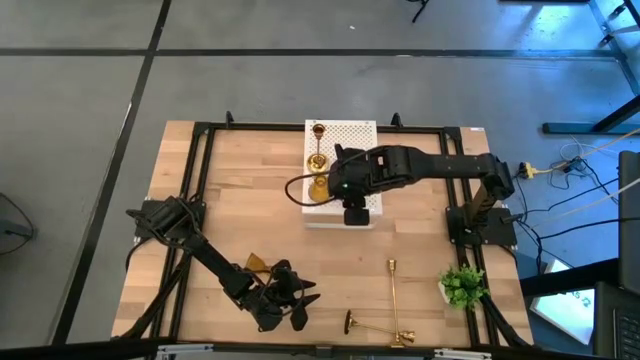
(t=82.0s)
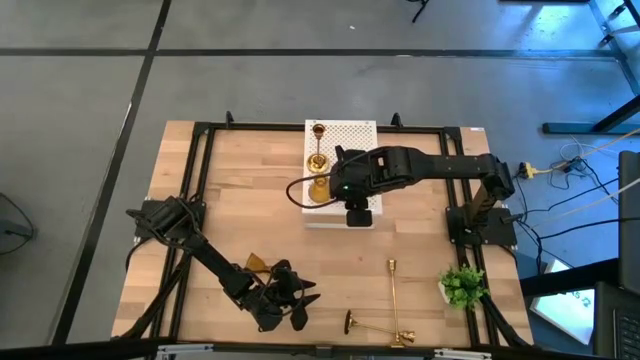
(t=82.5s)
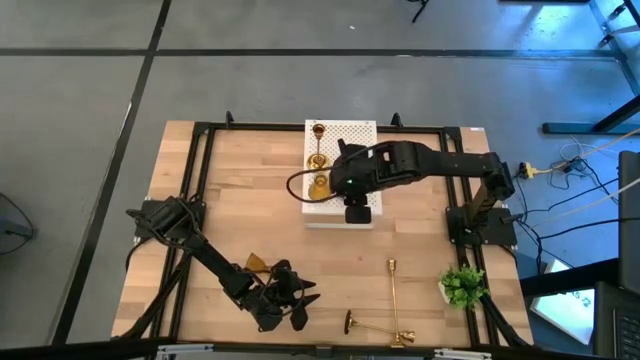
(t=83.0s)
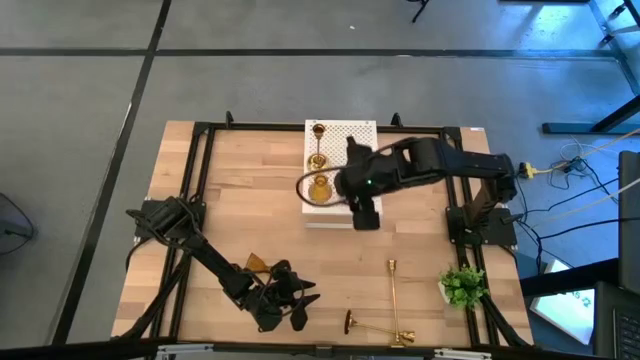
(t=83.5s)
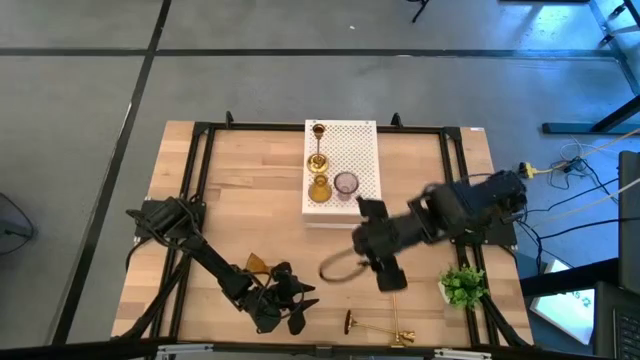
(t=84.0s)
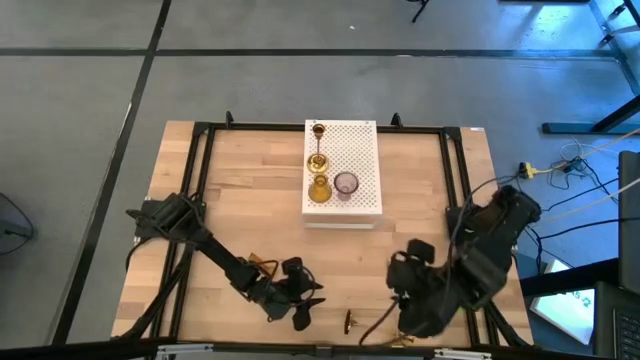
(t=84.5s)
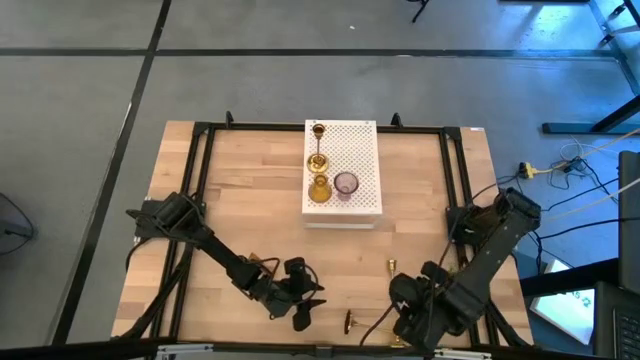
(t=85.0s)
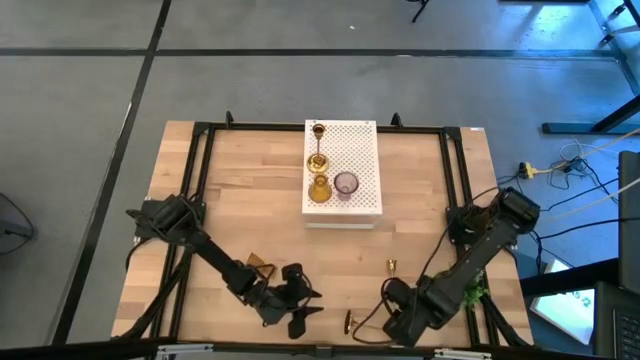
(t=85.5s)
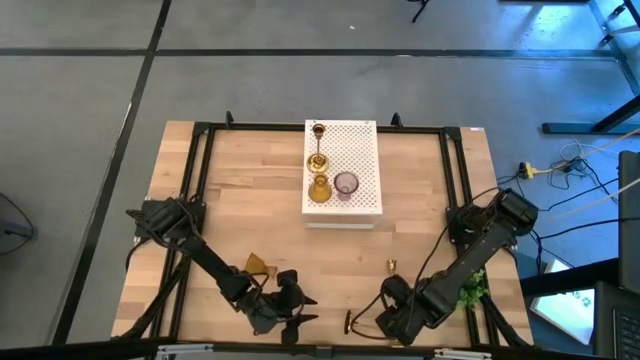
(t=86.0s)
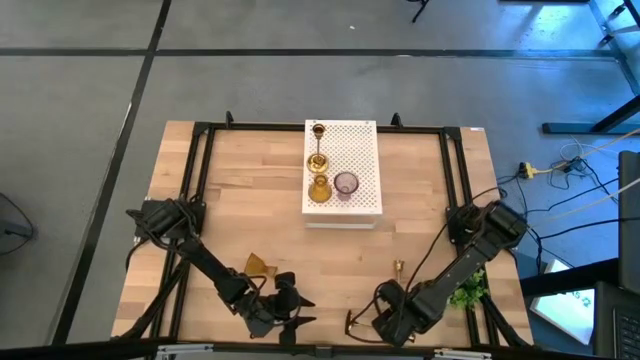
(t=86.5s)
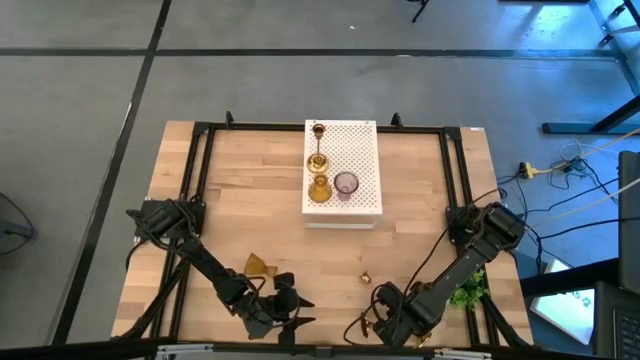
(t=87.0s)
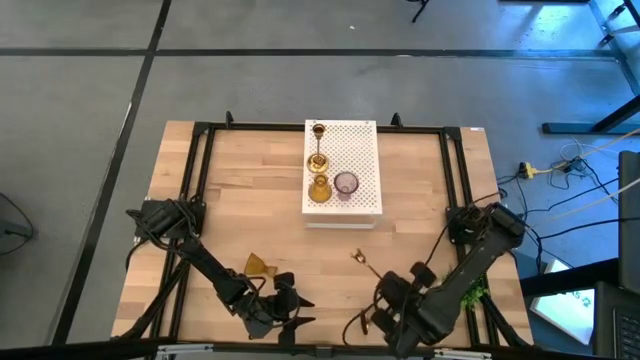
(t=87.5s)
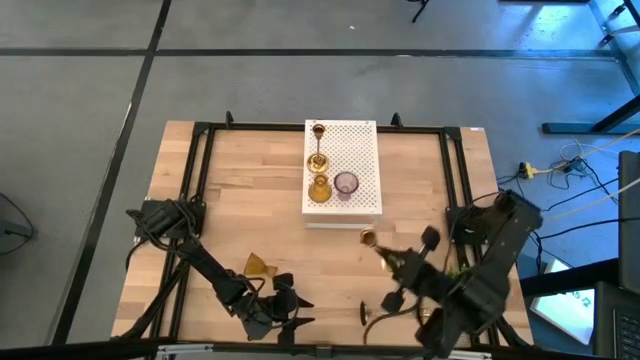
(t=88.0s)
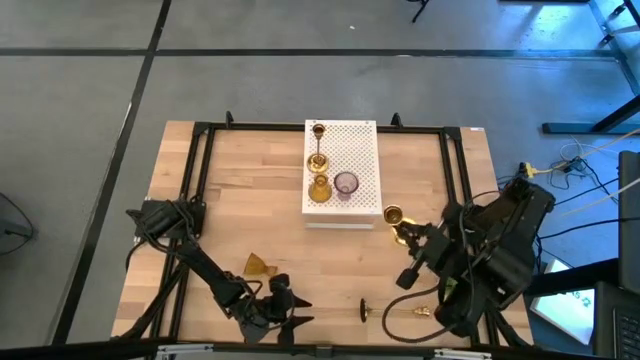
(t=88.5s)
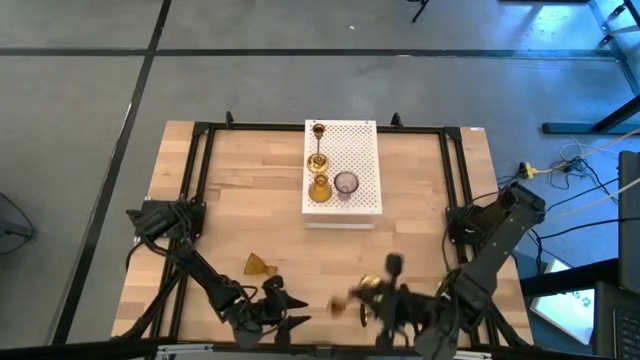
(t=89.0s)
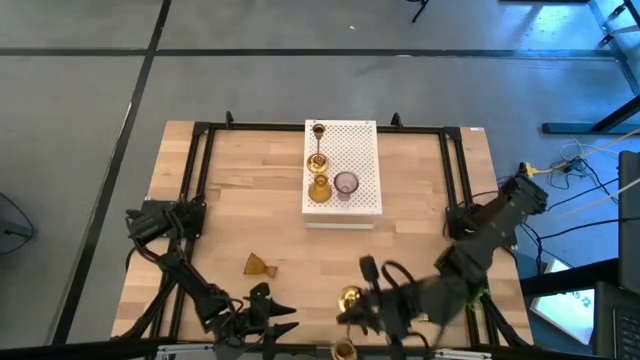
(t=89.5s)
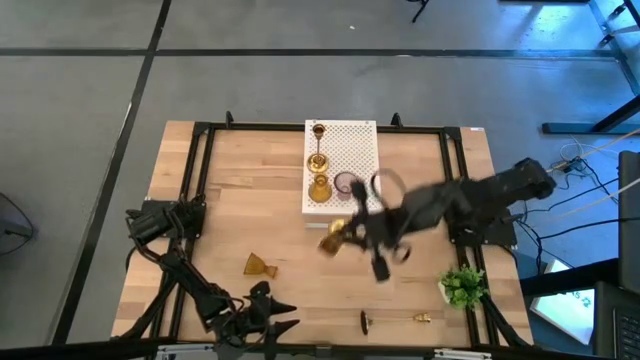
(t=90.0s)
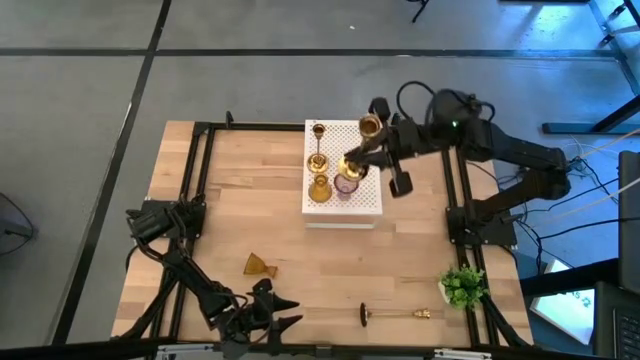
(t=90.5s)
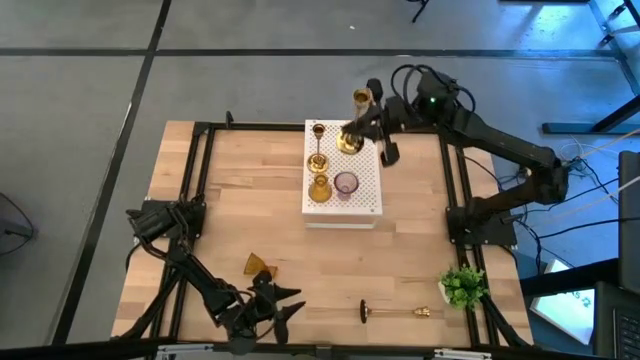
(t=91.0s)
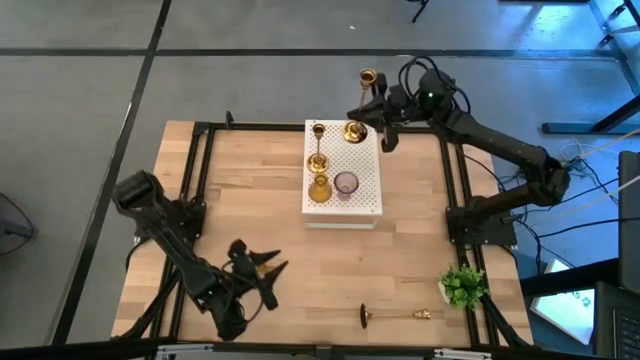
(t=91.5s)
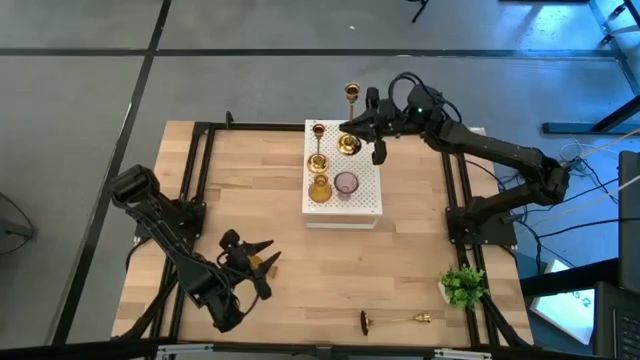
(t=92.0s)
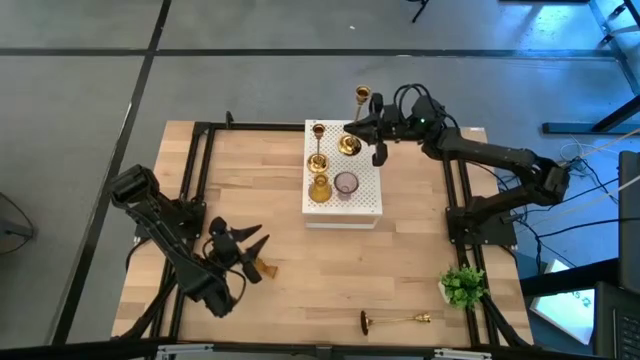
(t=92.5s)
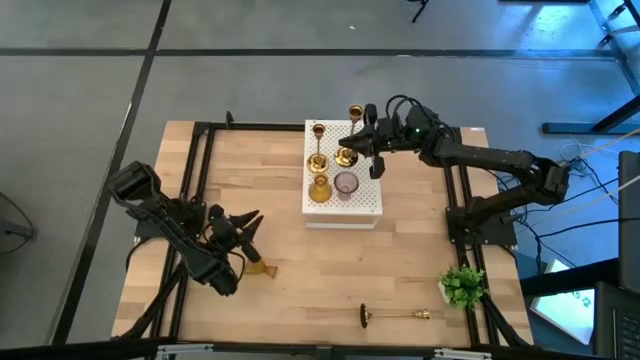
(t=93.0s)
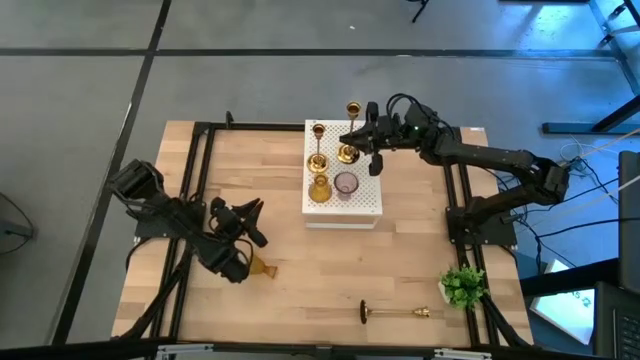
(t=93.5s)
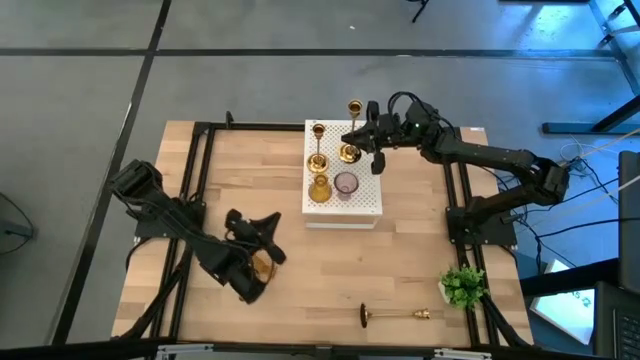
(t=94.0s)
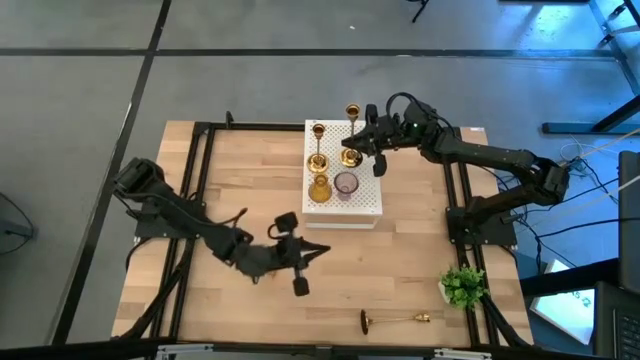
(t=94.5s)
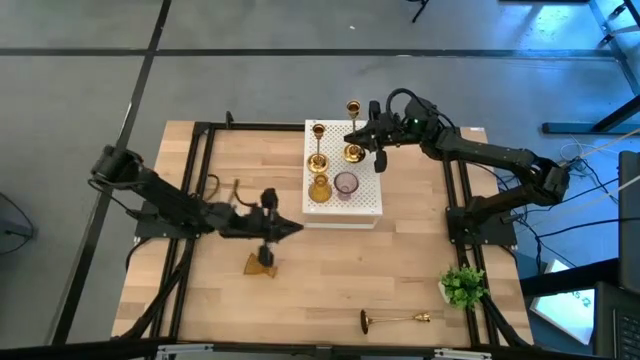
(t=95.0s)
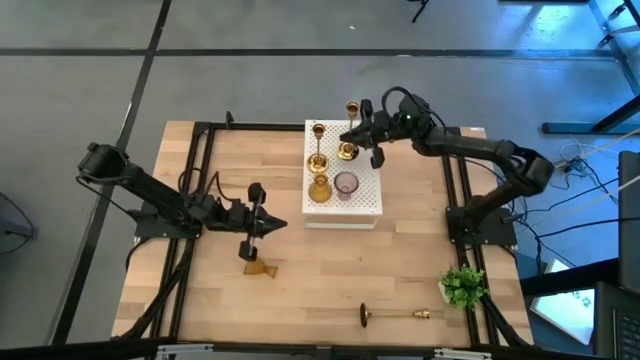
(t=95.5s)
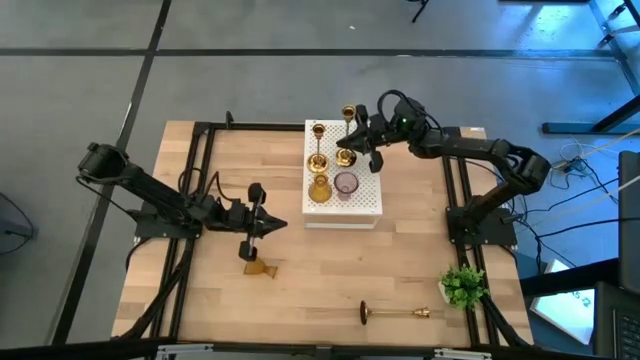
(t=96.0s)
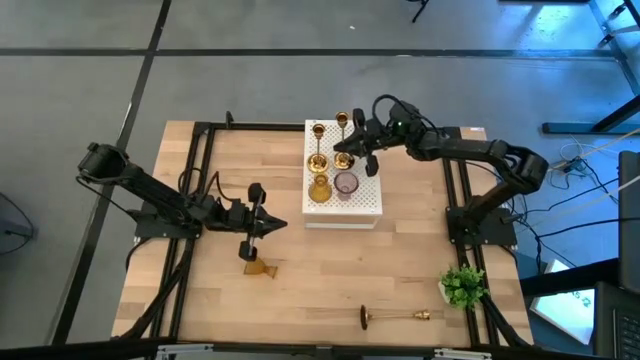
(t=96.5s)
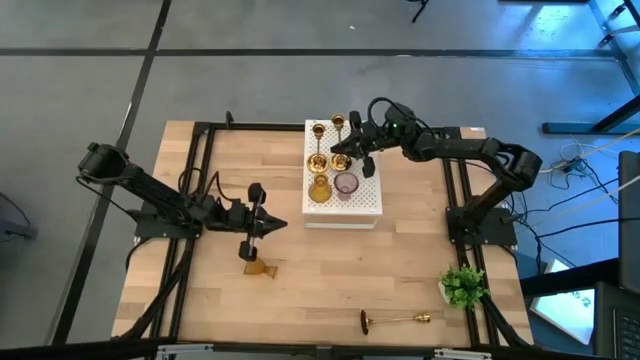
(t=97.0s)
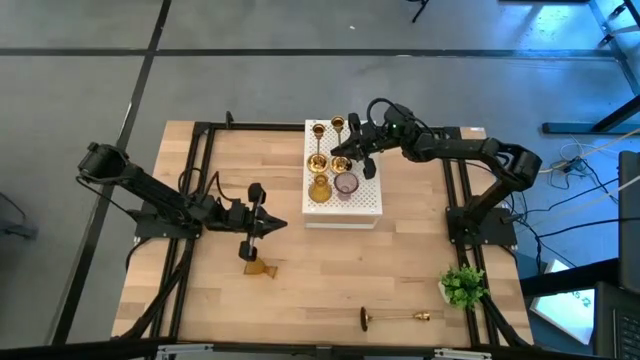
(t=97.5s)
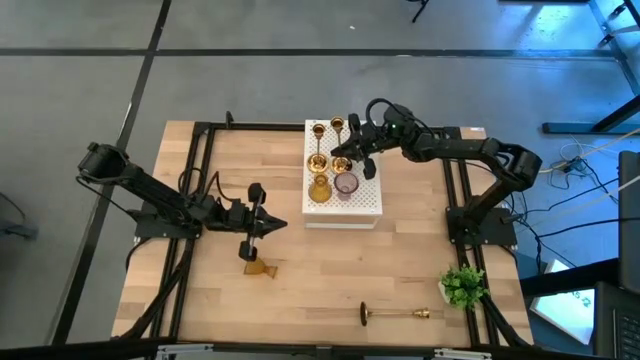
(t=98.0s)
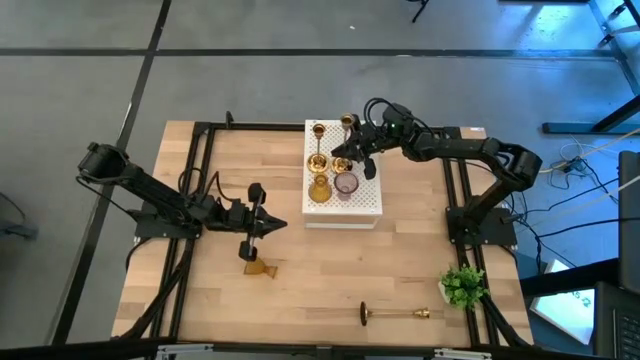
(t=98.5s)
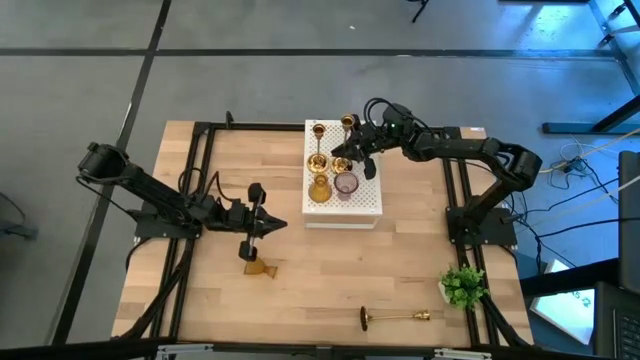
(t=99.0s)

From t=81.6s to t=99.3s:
Task: Pick & Place candle stick holders
Put the top gold candle holder on the shelf

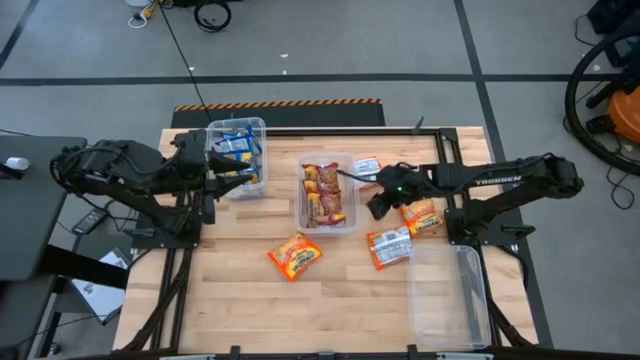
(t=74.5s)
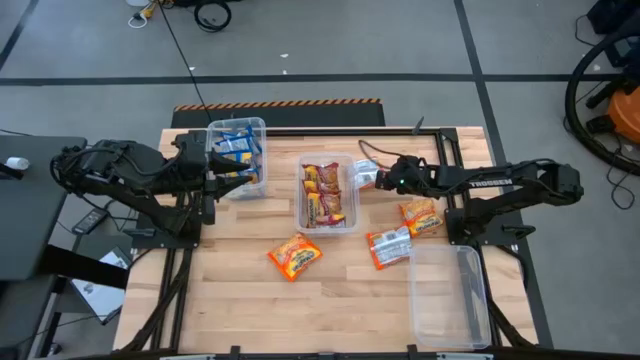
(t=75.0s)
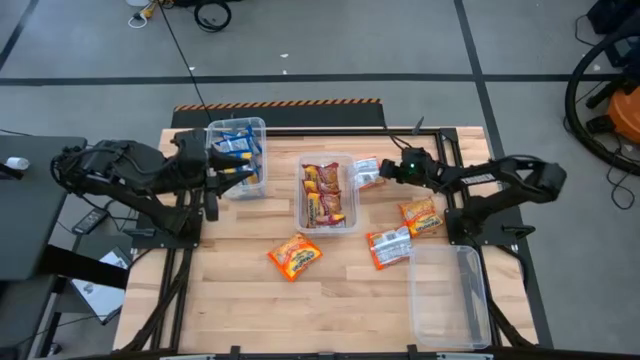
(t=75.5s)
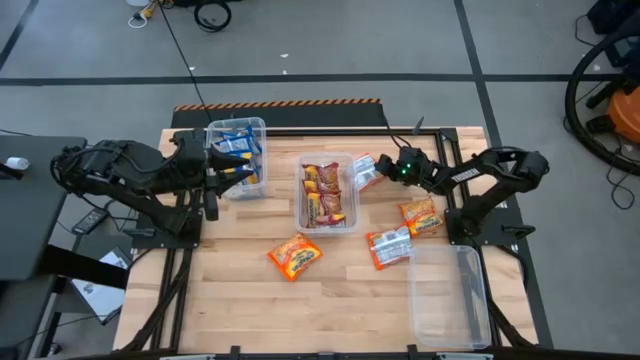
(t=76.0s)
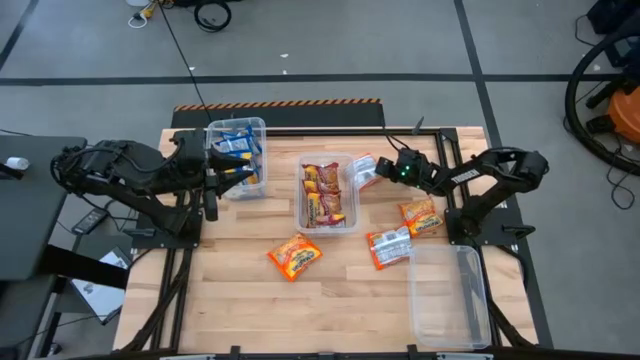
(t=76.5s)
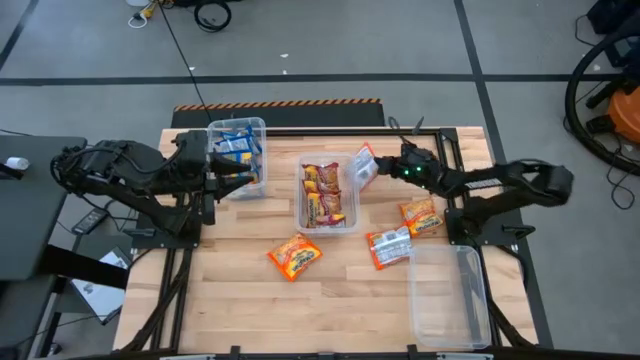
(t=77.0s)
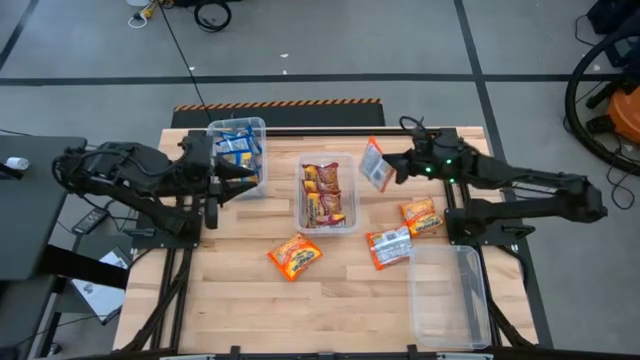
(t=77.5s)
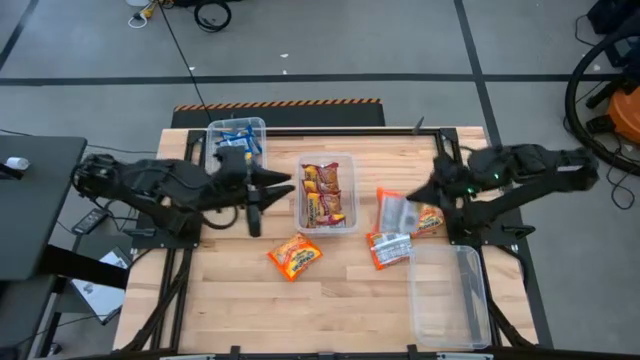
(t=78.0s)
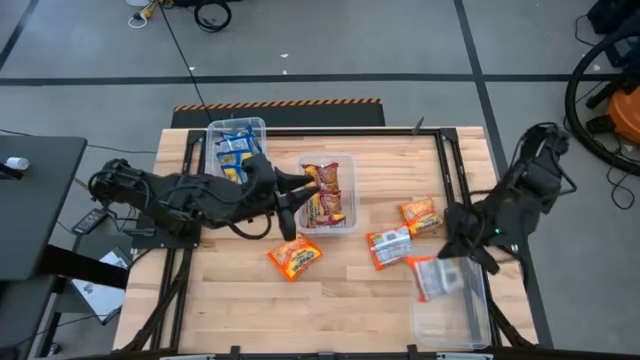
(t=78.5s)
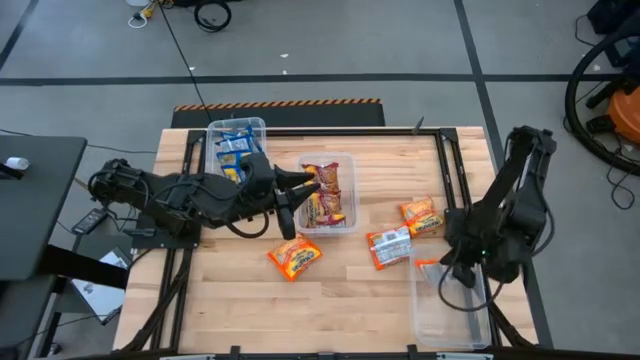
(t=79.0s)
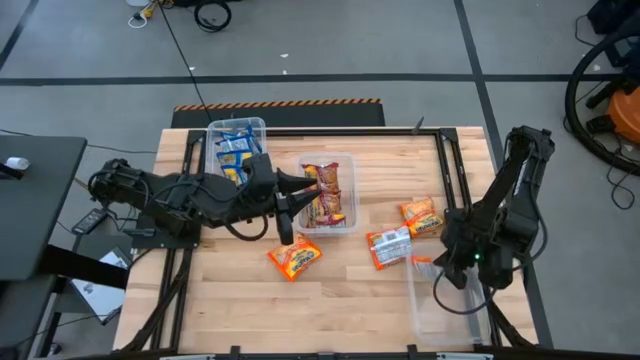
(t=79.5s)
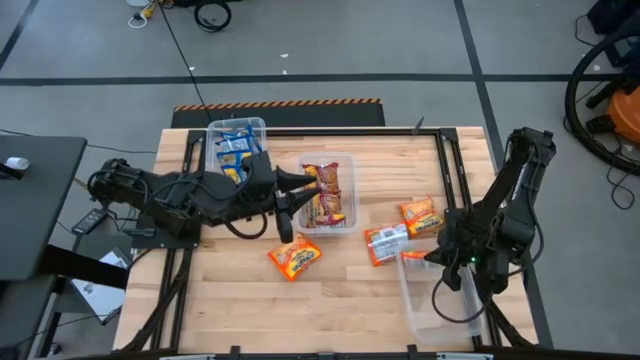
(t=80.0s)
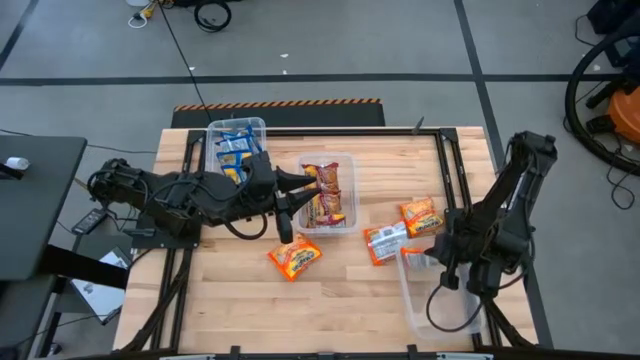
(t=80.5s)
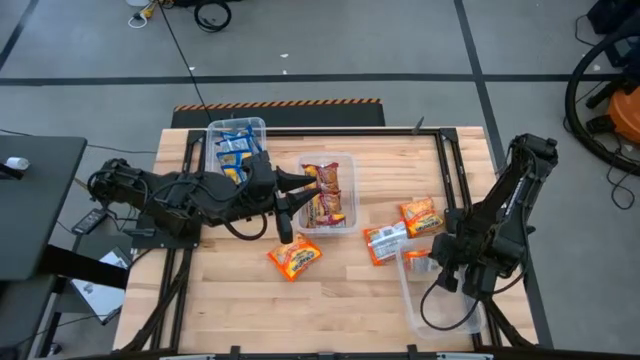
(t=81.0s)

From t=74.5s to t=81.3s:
Task: Sort Maruchan noodles
Put the orange noodle pack into the bottom transparent bin
